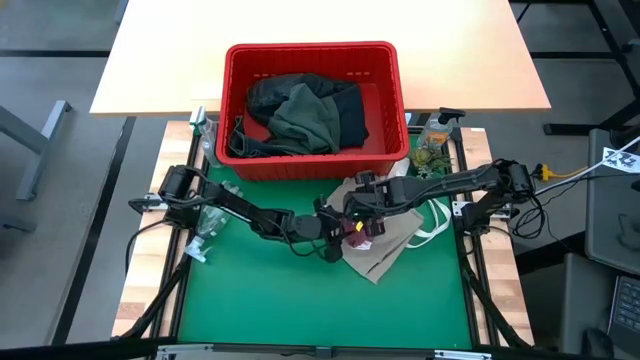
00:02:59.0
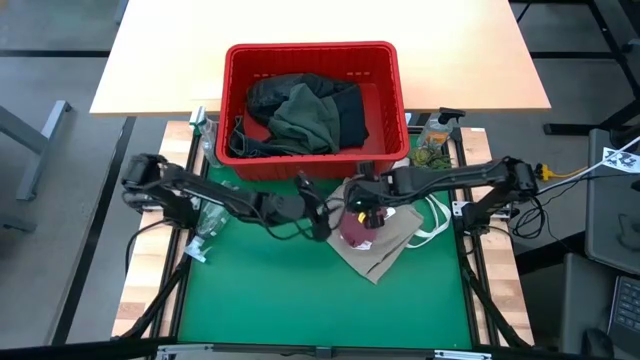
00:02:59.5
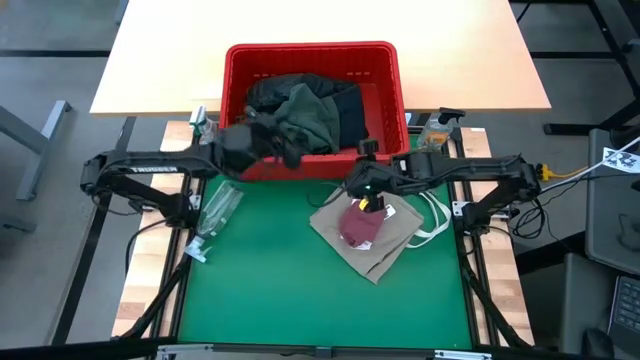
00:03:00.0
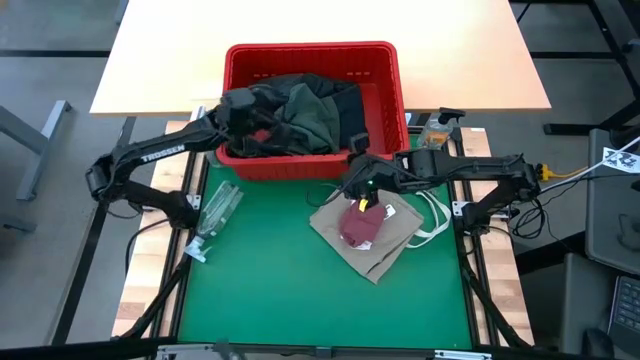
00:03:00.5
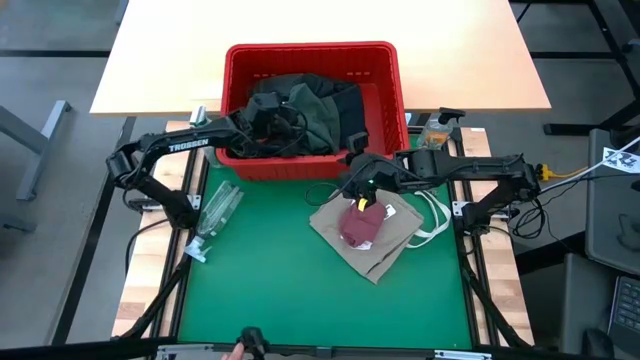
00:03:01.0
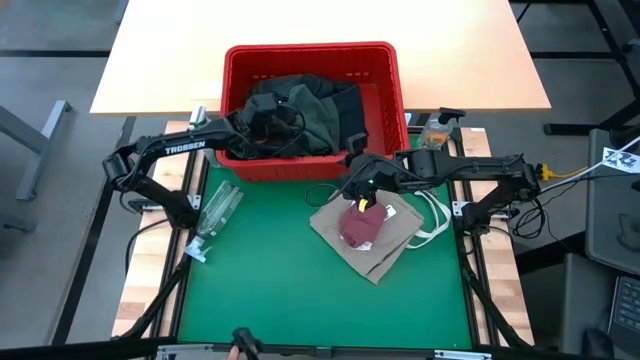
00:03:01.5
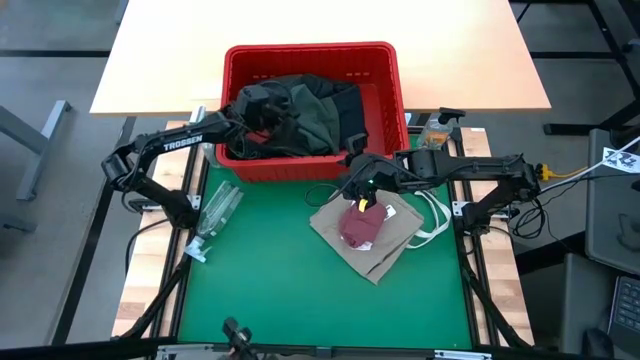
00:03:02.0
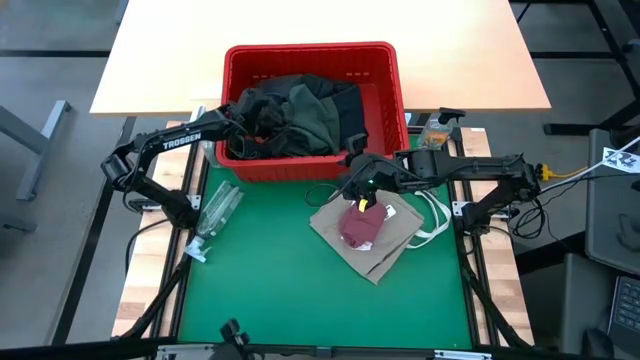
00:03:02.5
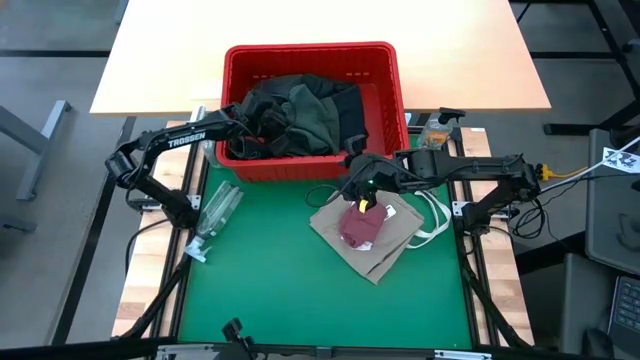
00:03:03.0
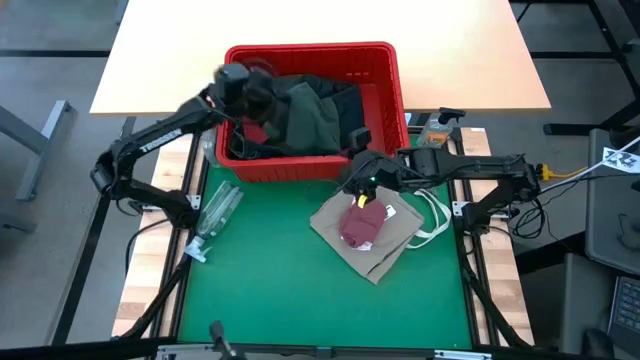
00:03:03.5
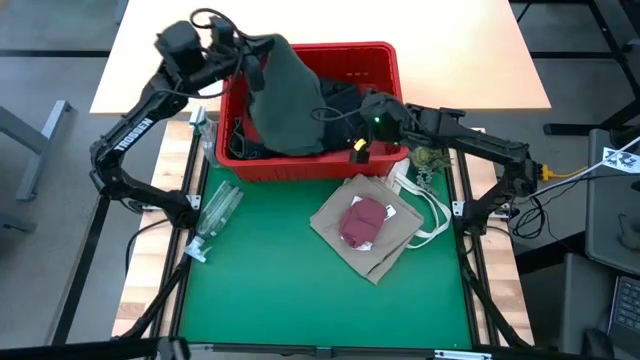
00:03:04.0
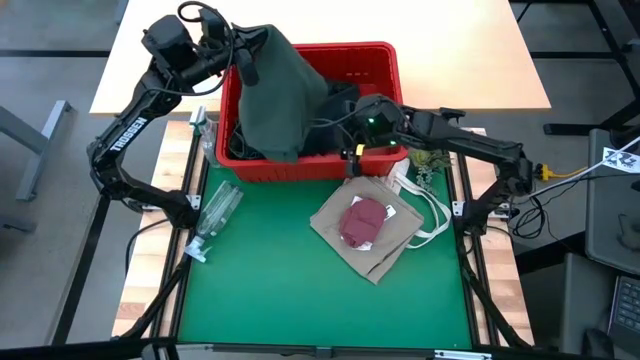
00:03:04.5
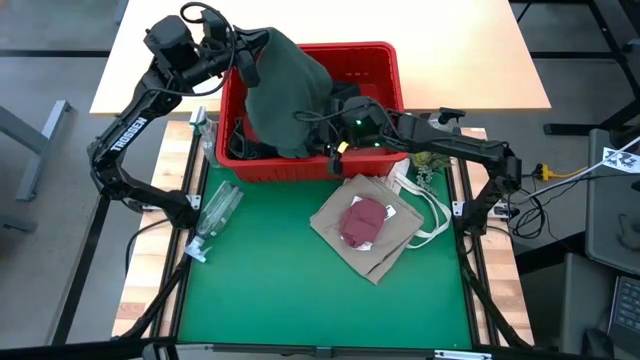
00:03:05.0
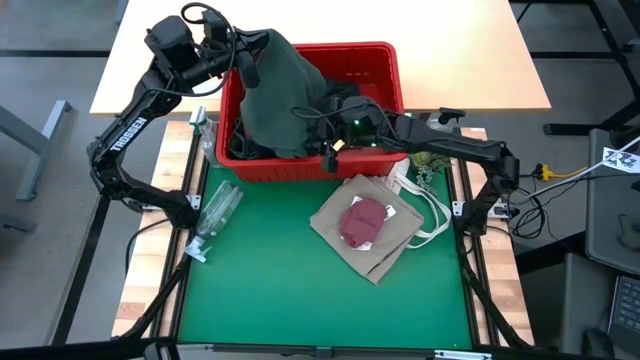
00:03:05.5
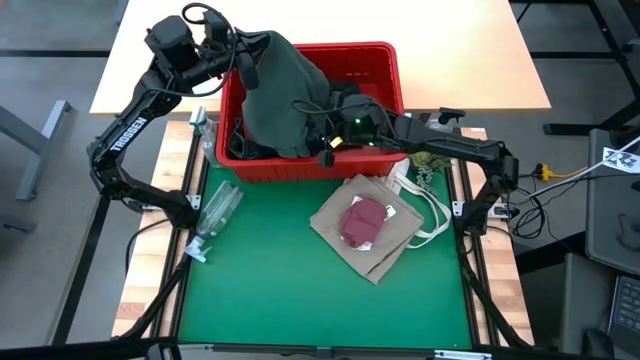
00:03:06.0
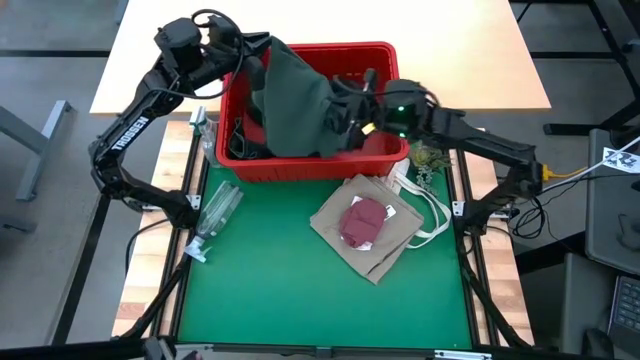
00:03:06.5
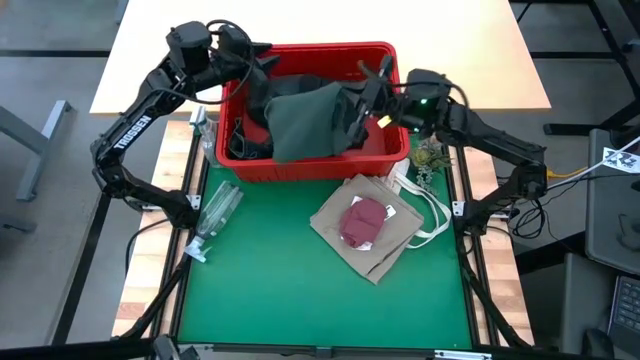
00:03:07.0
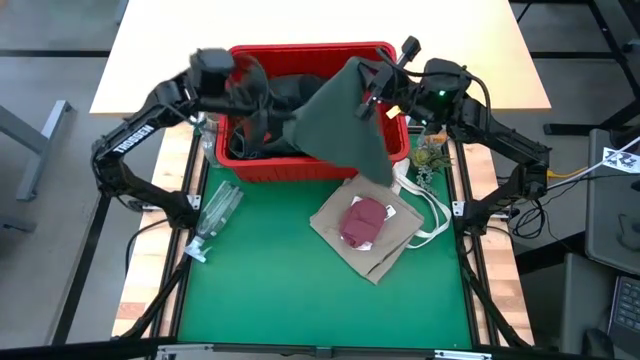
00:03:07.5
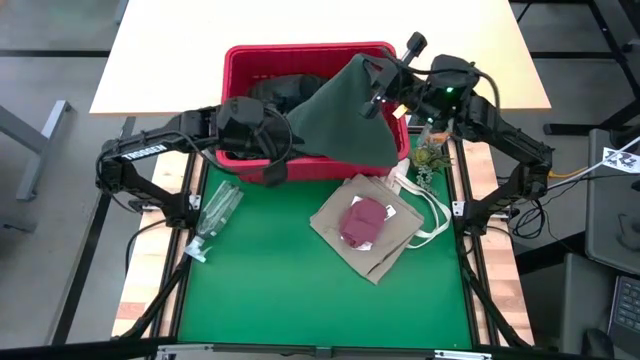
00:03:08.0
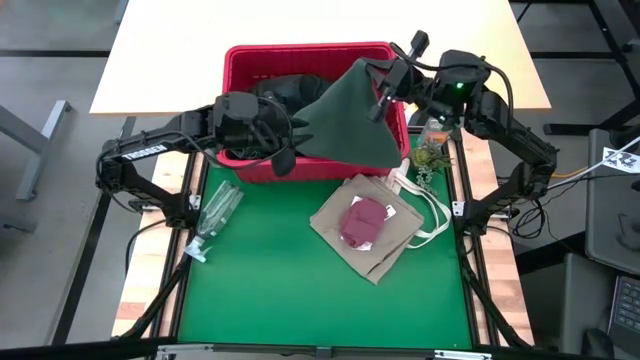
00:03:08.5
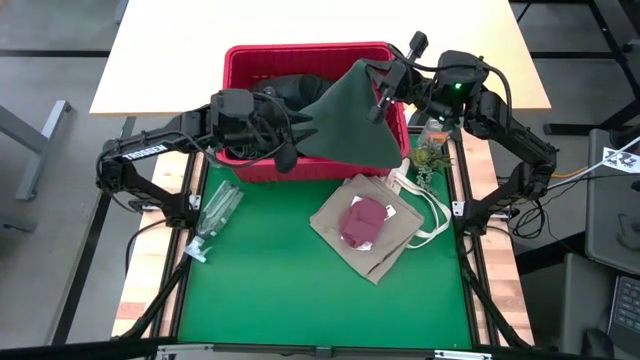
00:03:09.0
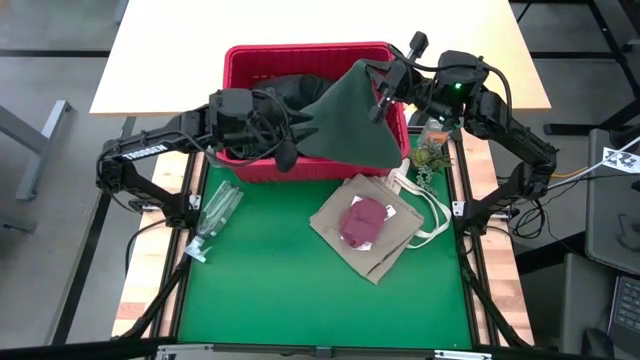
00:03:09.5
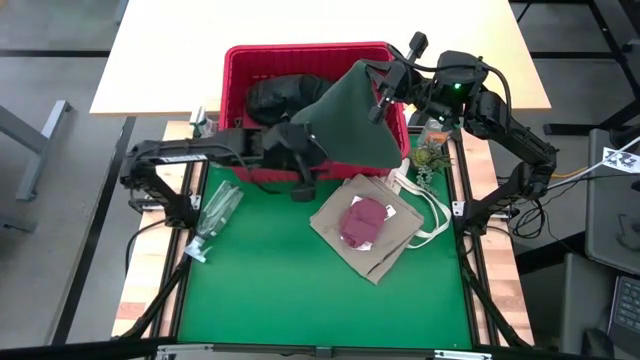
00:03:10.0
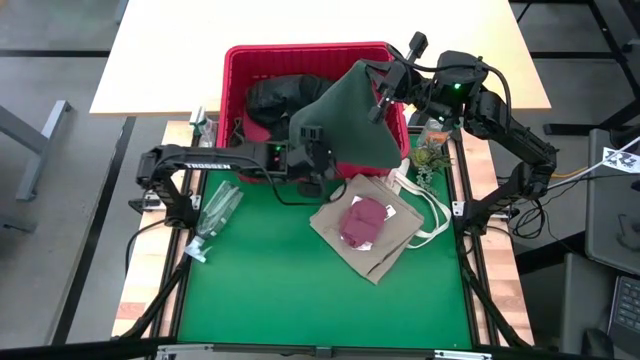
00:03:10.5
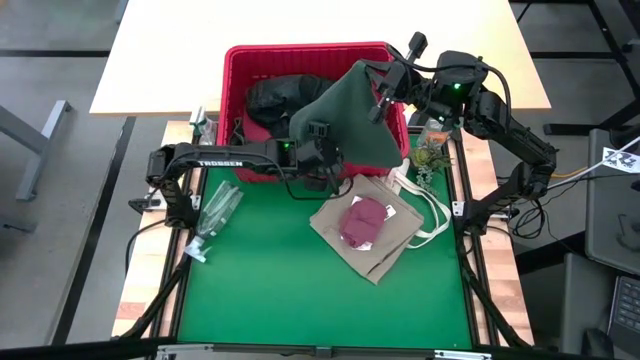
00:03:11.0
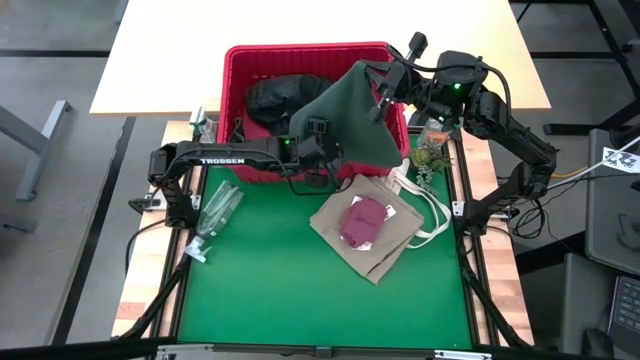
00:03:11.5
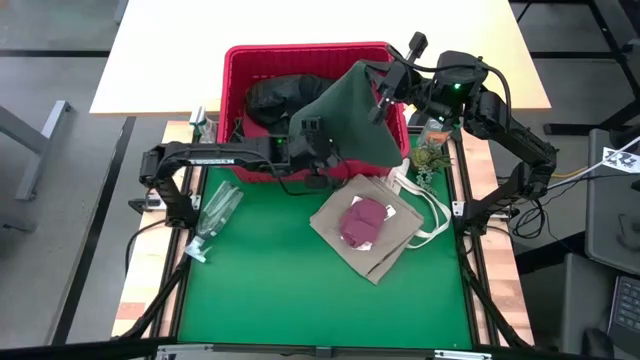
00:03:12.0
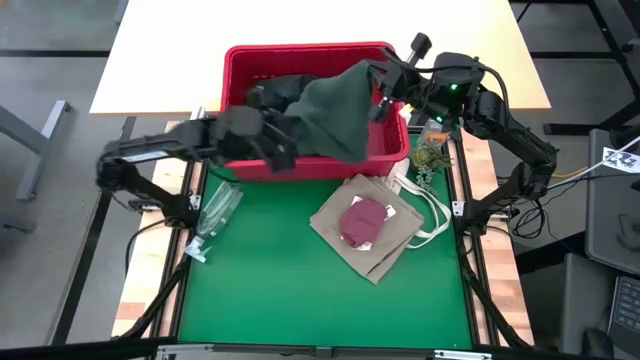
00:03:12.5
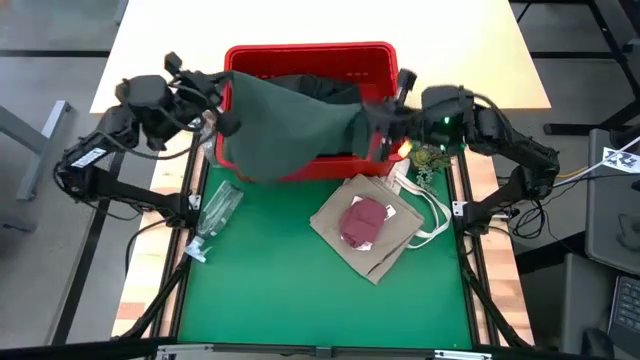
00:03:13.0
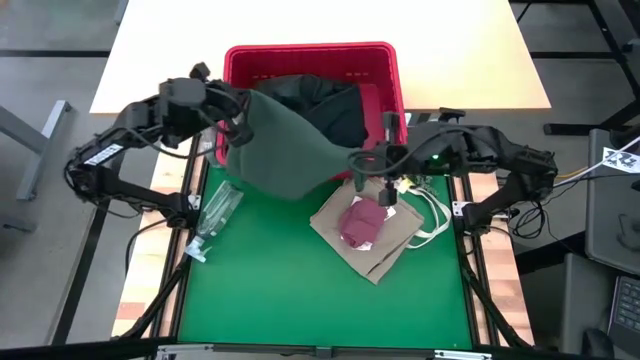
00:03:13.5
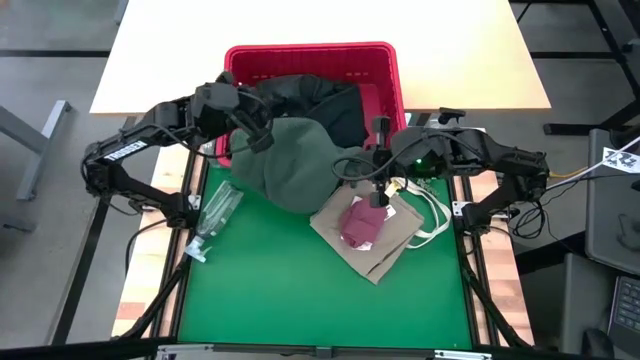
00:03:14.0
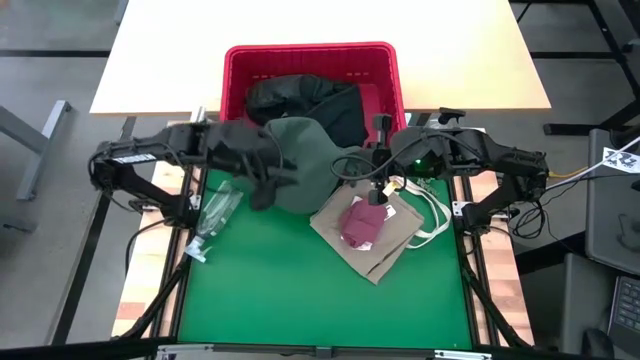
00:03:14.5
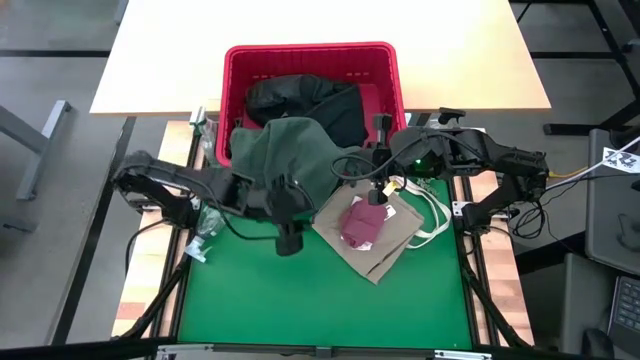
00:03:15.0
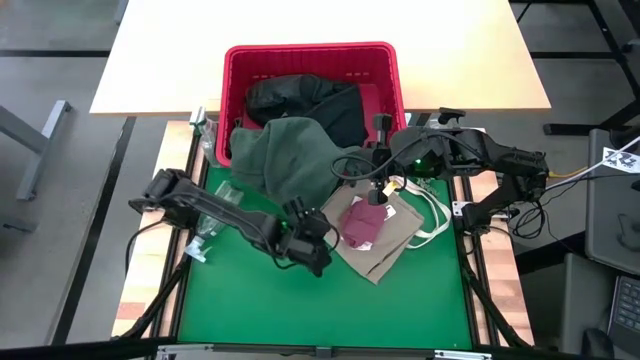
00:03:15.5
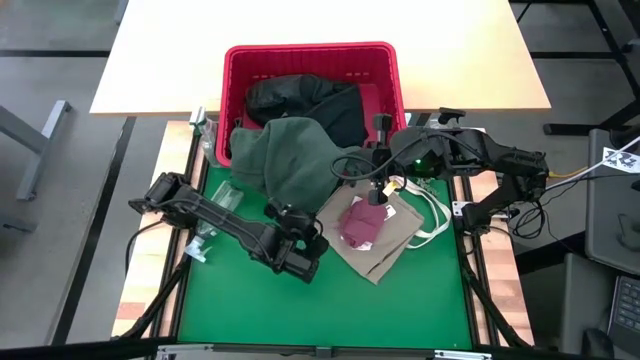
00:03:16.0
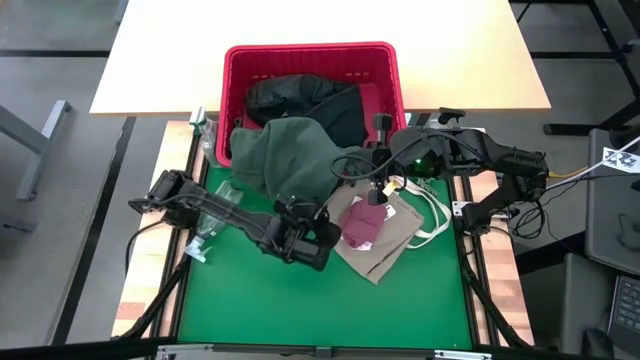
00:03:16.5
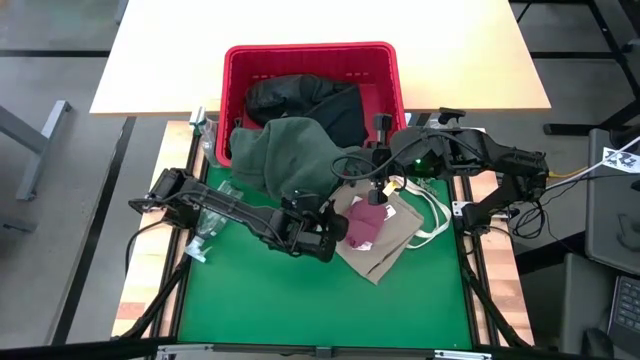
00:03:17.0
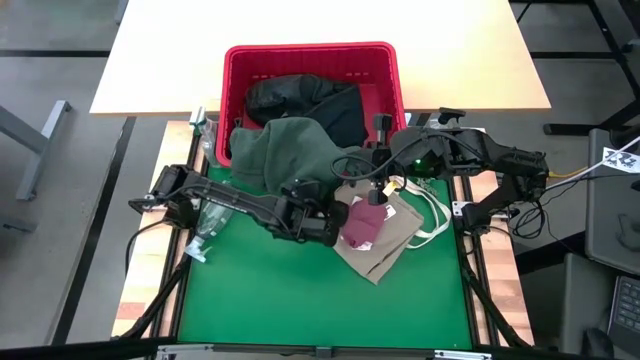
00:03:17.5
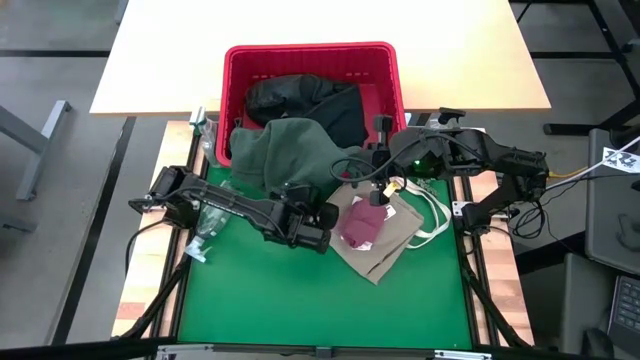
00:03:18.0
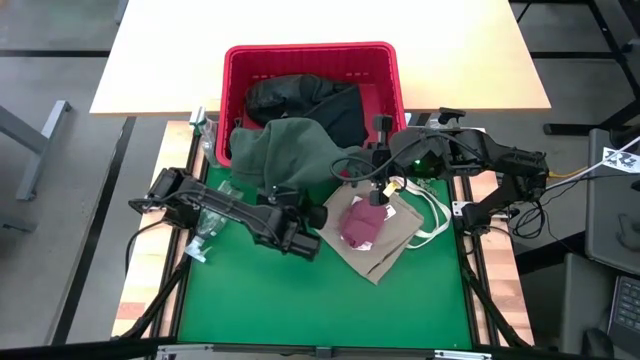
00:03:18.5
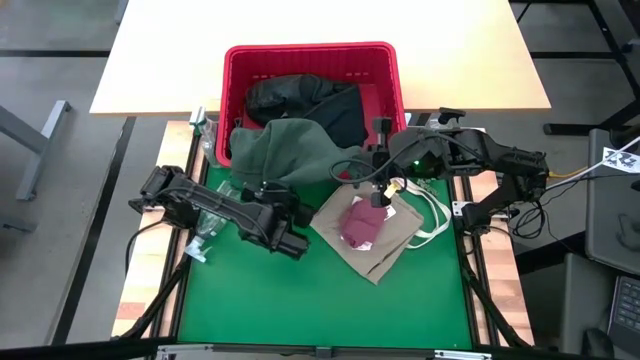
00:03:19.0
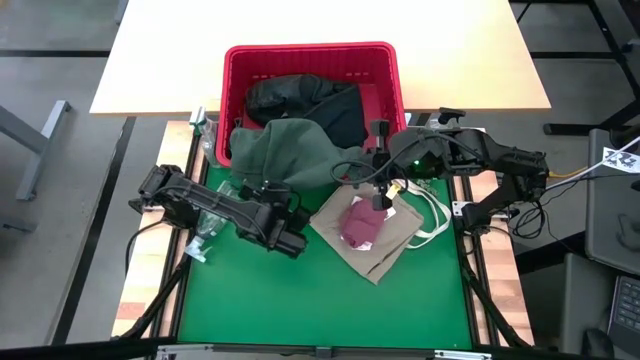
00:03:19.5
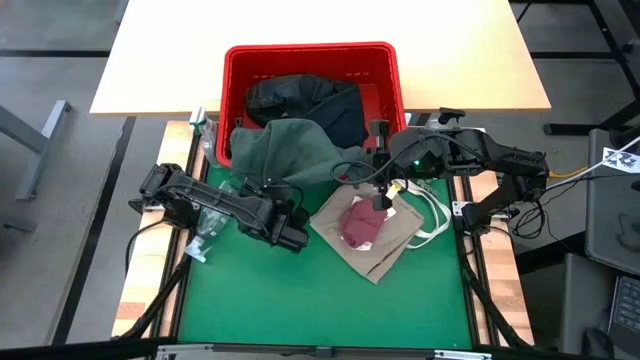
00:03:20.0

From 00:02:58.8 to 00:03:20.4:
Task: Fold laundry
Fold the green polo shirt
